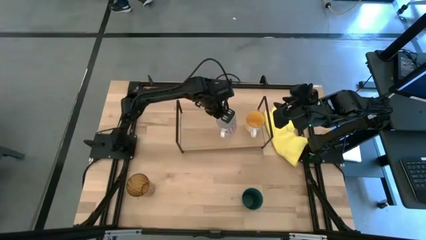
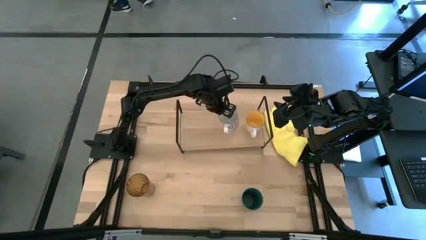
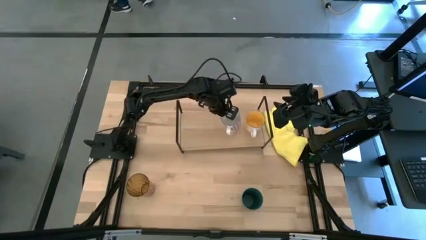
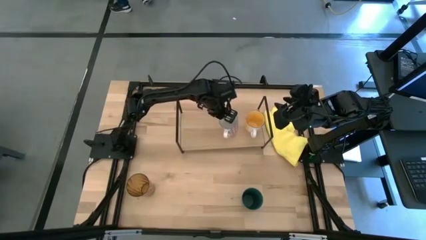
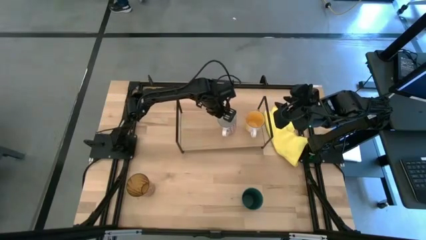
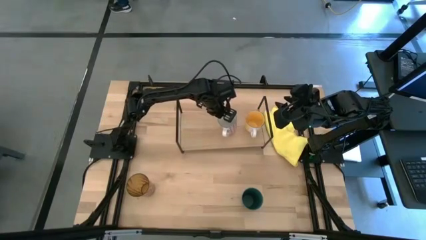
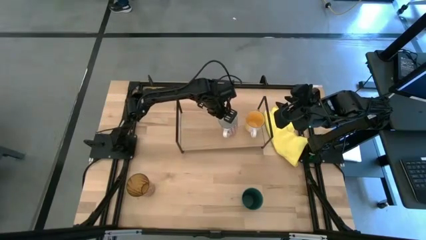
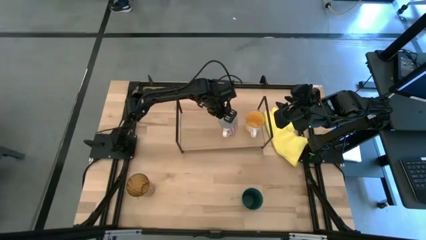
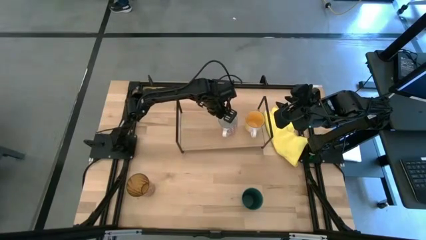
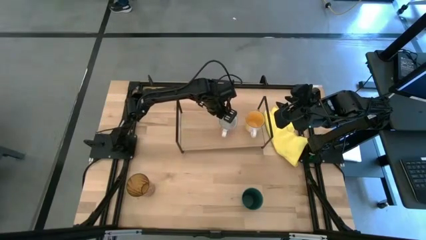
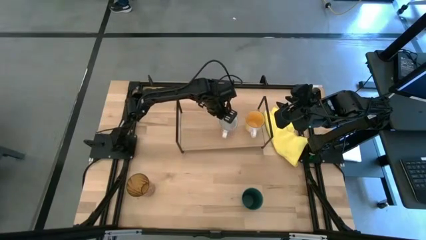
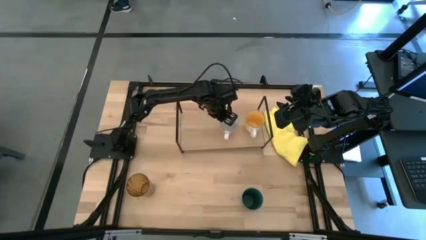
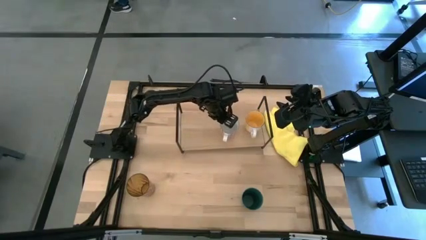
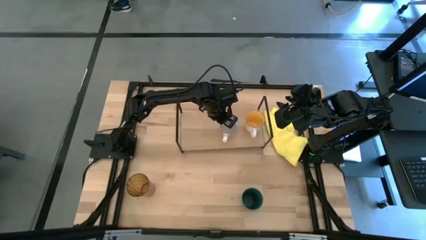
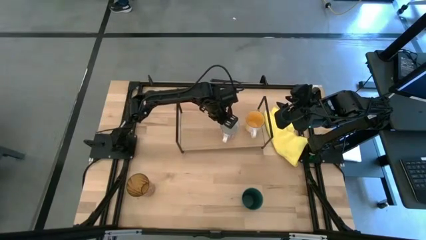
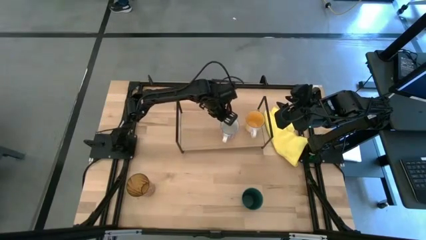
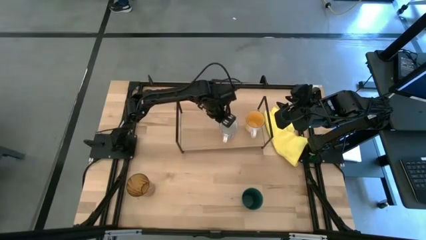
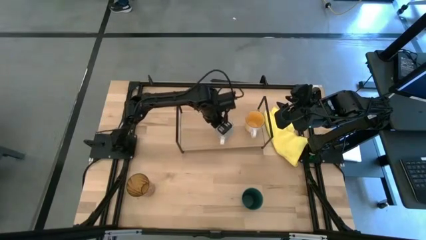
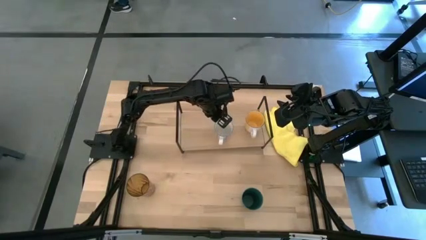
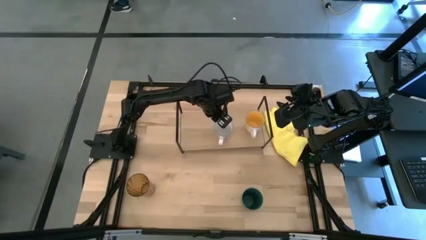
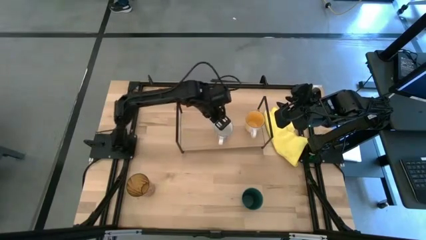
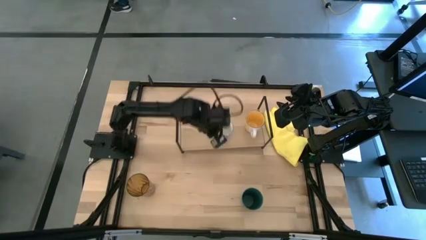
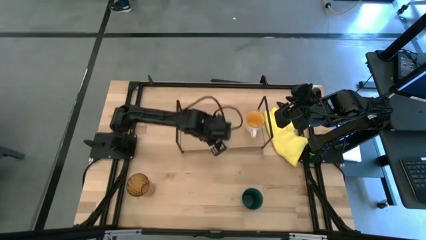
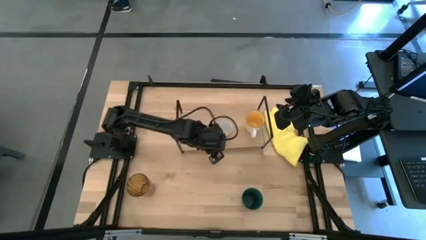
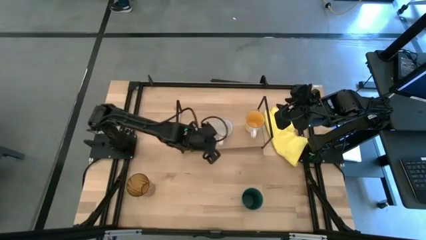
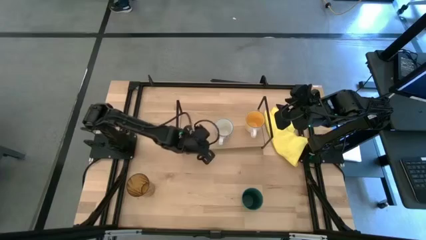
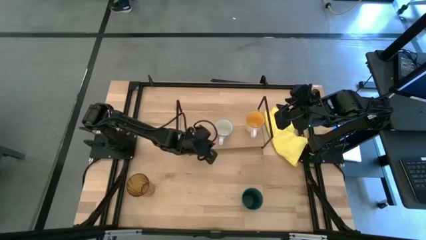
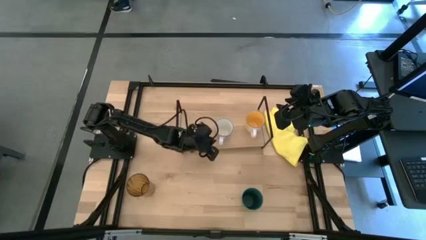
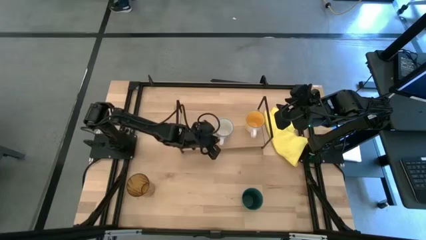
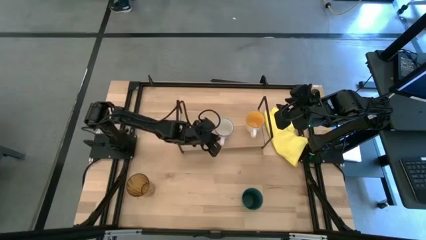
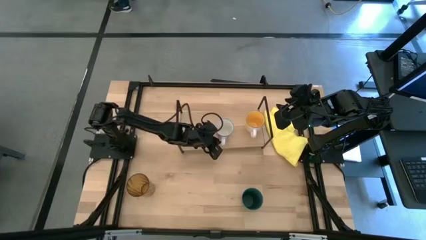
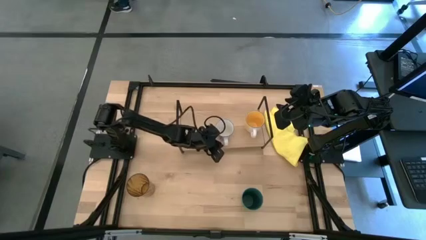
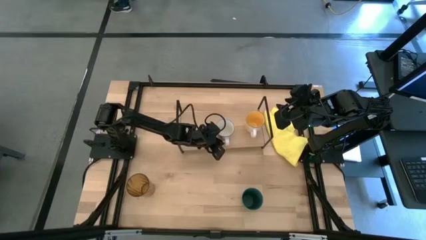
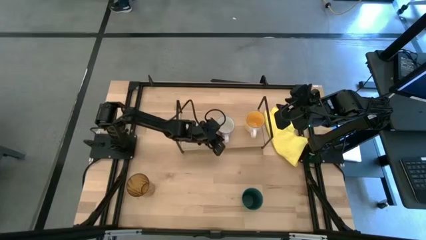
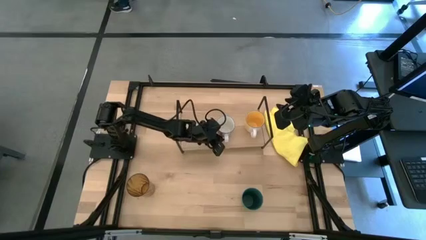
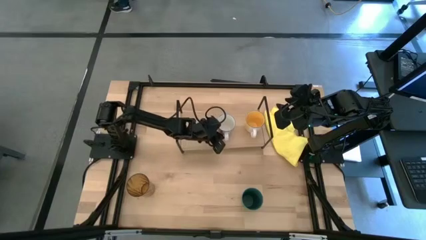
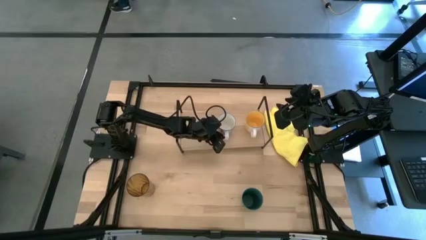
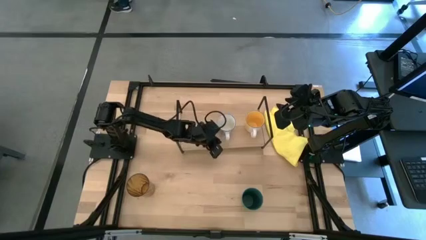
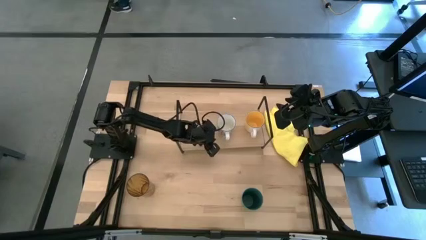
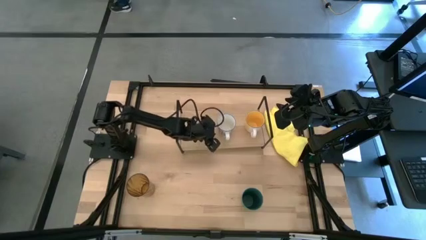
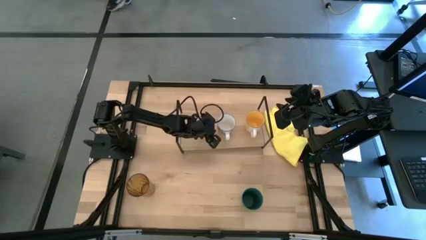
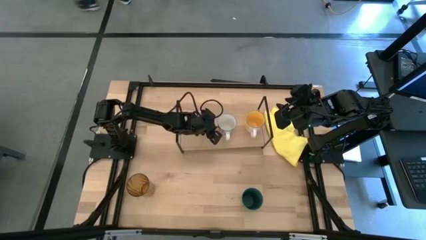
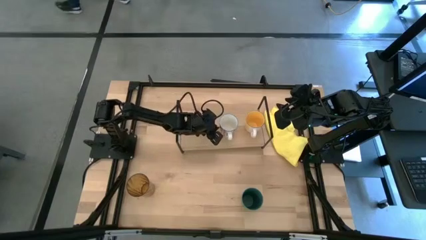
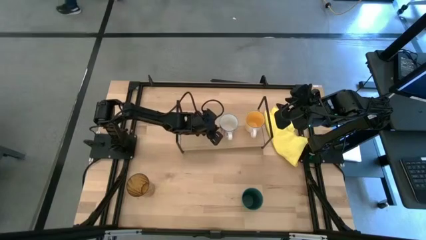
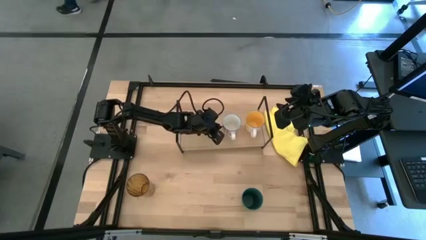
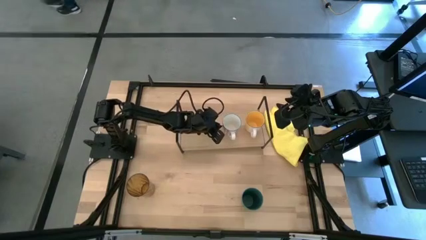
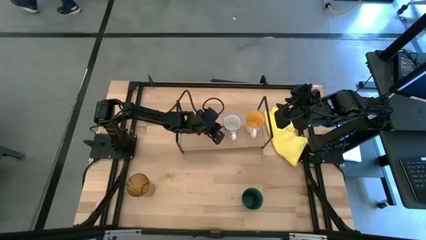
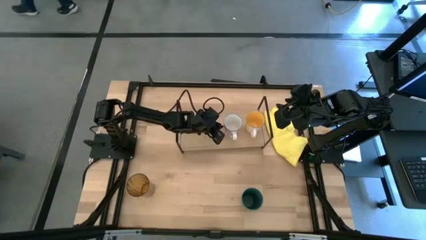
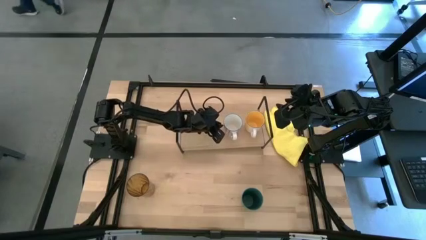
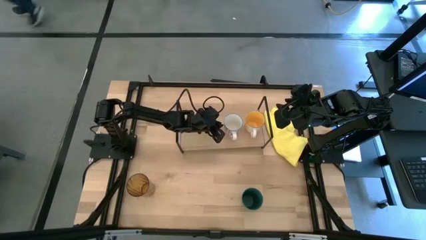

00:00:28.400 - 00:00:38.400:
Task: Stack small to large cups/mugs on shelf
Put the red cup on the shelf
